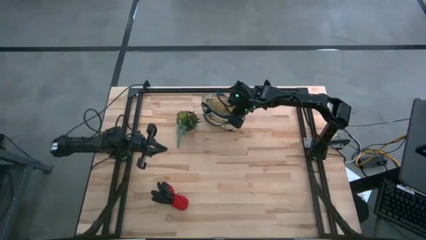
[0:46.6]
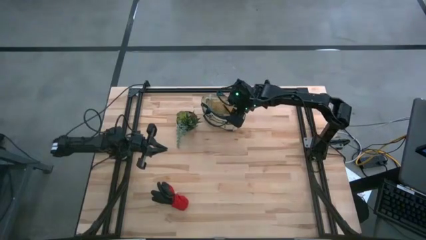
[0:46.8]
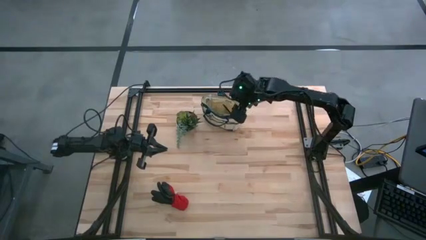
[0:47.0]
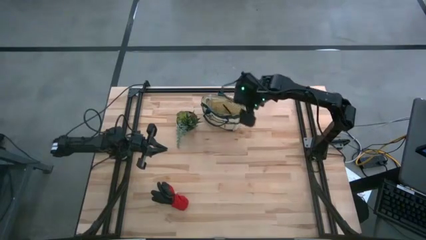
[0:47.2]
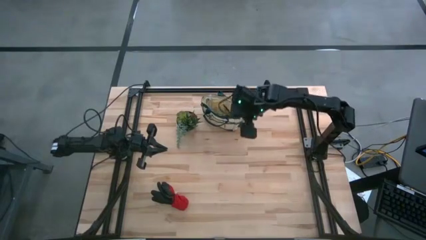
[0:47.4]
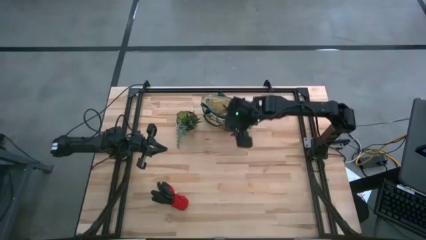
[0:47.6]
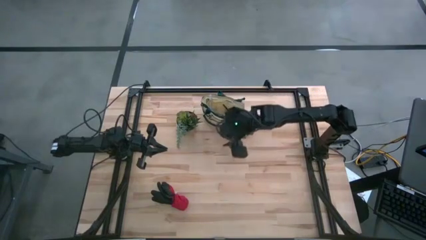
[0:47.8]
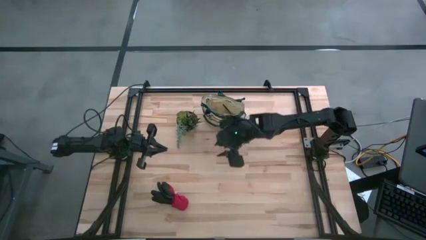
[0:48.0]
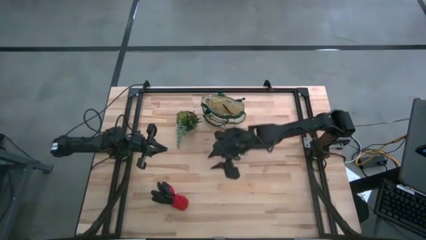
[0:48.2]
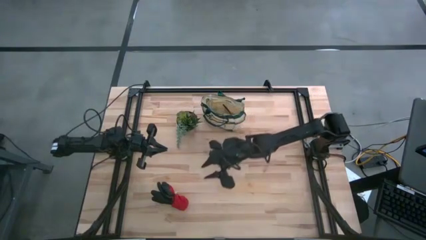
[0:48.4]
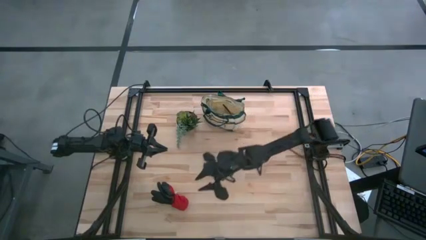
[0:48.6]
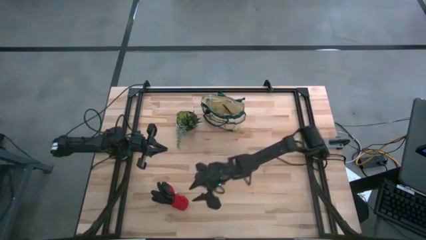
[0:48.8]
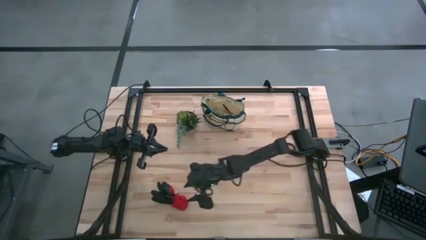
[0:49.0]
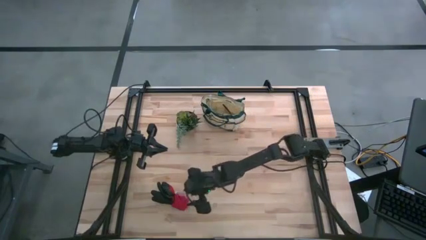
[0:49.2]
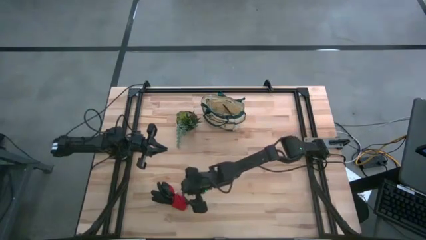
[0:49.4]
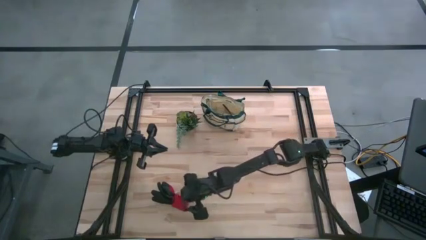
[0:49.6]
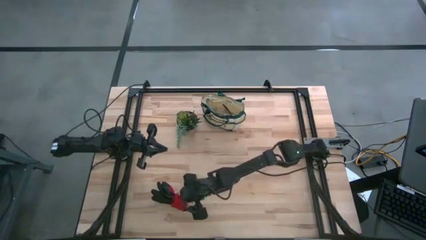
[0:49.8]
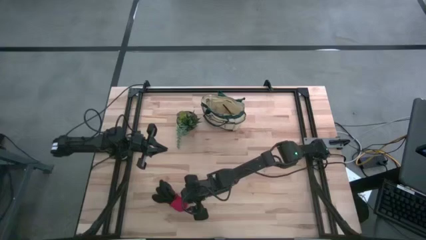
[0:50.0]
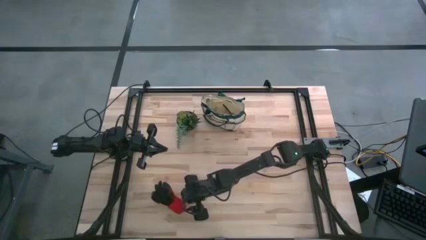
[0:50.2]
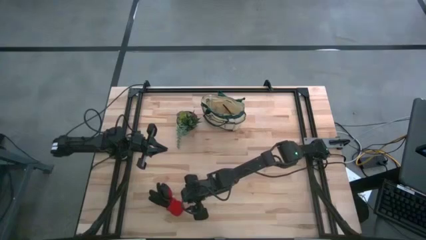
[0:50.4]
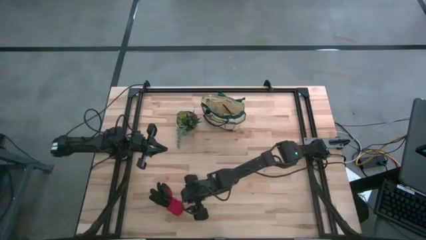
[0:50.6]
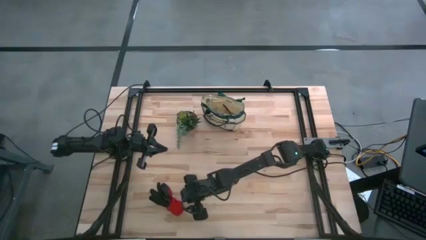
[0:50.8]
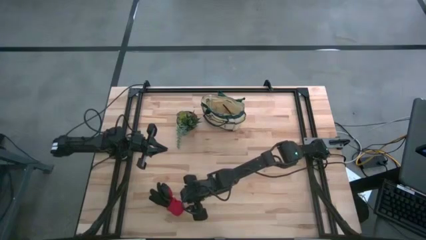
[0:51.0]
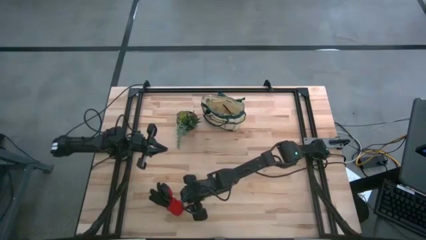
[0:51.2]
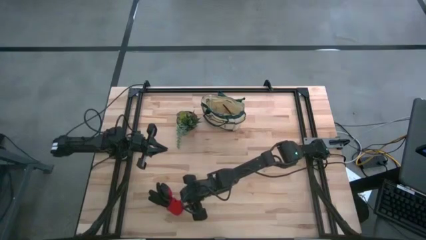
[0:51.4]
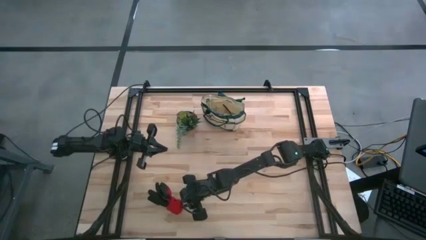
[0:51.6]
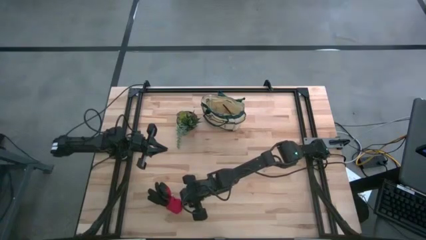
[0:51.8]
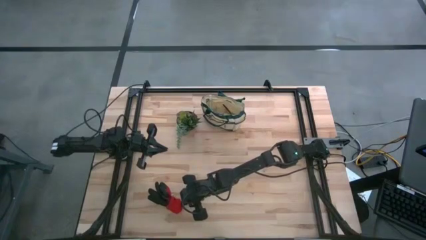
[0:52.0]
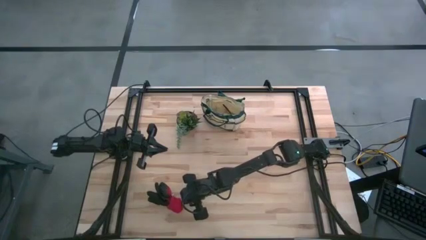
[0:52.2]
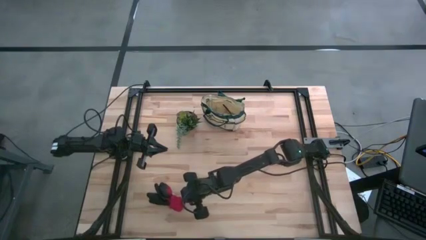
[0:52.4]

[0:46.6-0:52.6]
Task: Pick & Place Garden tools in Gardening bag
Put the red gloves into the gardening bag

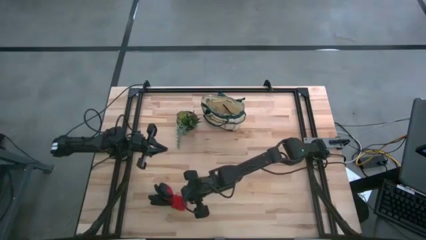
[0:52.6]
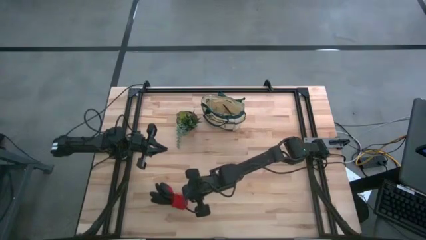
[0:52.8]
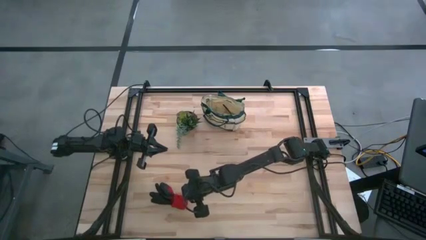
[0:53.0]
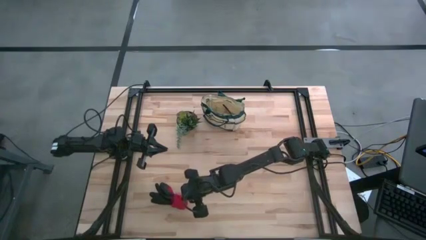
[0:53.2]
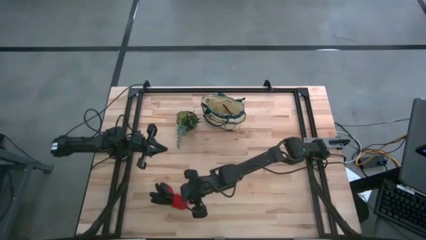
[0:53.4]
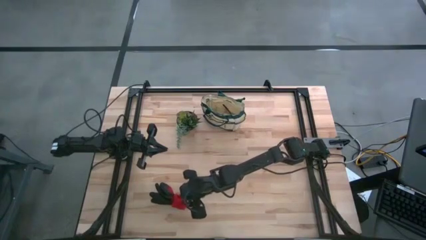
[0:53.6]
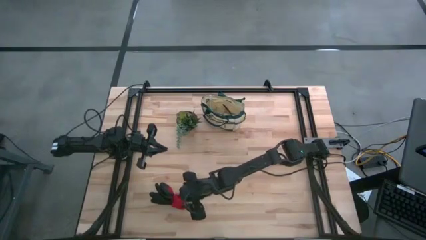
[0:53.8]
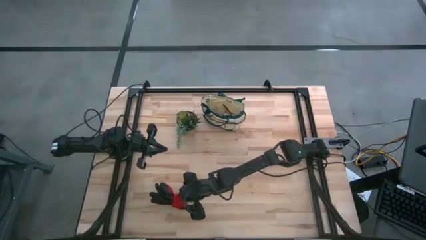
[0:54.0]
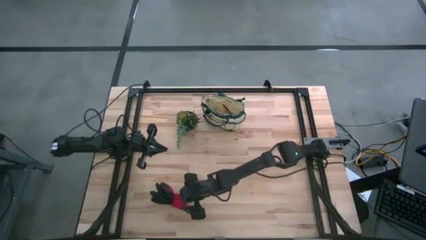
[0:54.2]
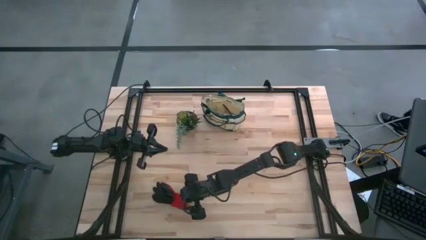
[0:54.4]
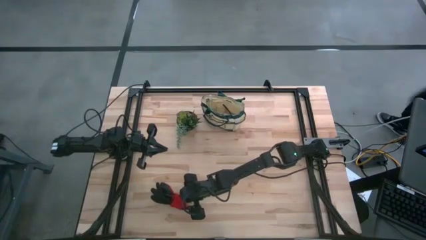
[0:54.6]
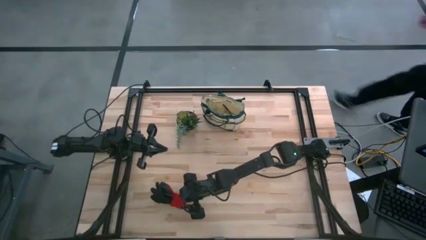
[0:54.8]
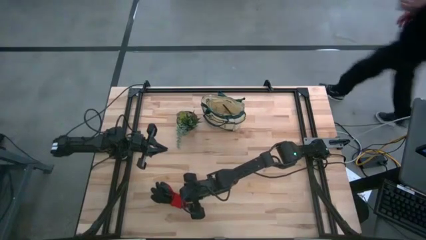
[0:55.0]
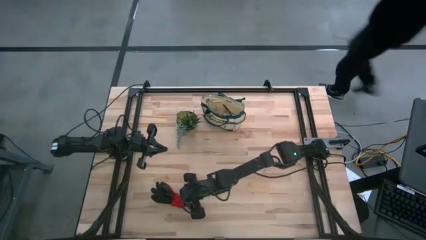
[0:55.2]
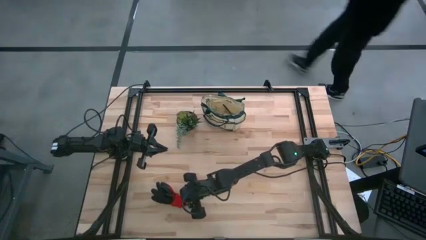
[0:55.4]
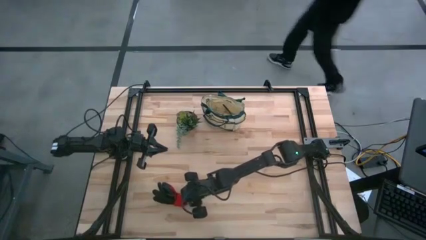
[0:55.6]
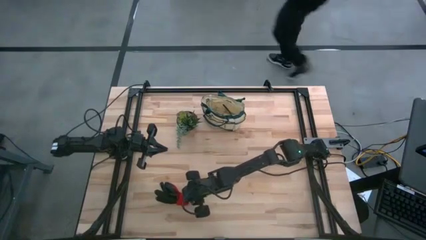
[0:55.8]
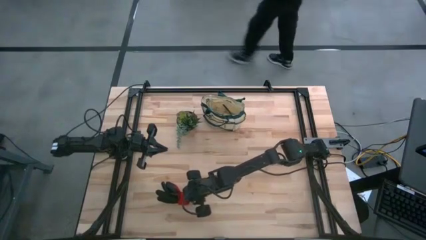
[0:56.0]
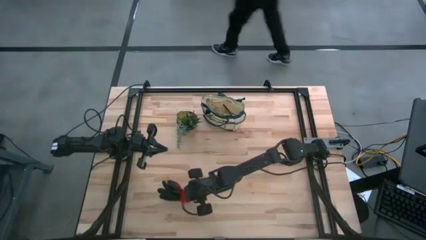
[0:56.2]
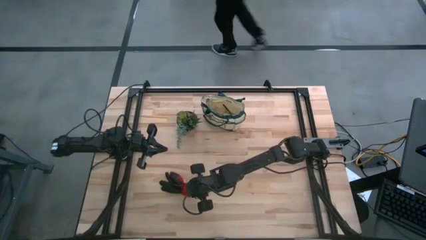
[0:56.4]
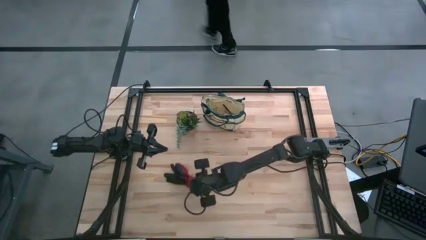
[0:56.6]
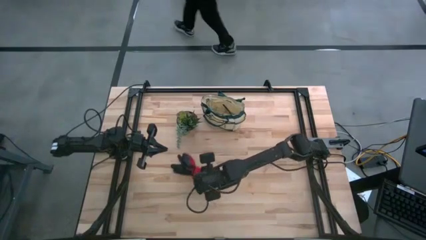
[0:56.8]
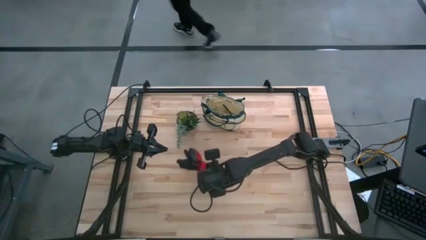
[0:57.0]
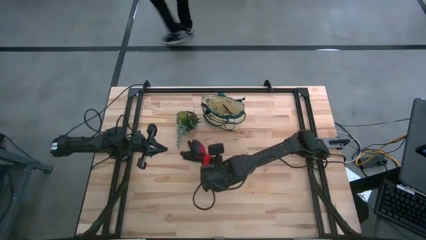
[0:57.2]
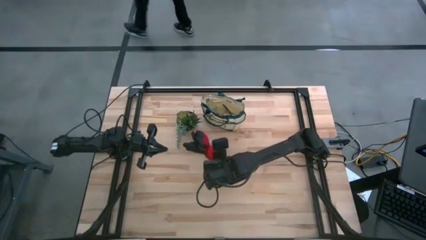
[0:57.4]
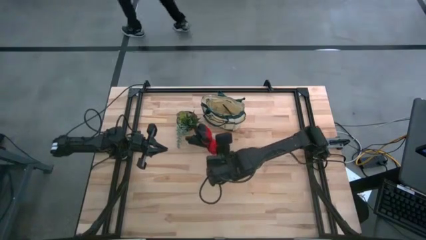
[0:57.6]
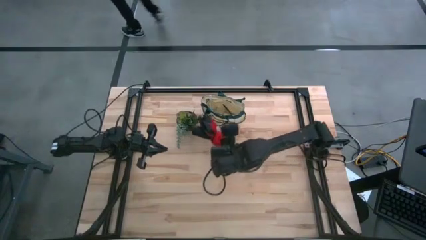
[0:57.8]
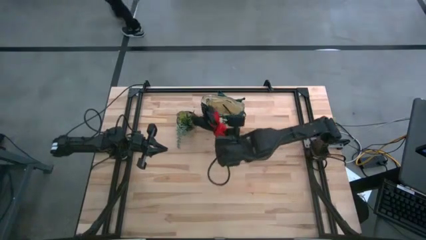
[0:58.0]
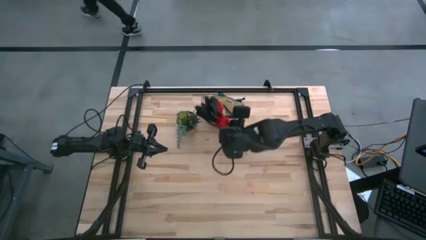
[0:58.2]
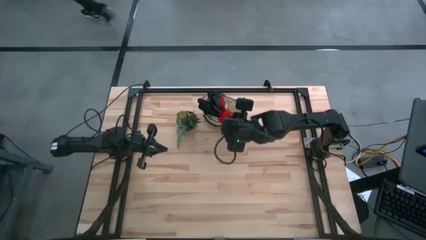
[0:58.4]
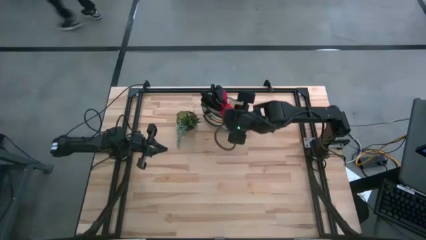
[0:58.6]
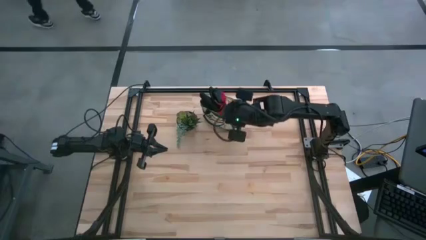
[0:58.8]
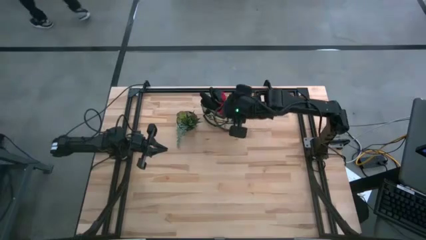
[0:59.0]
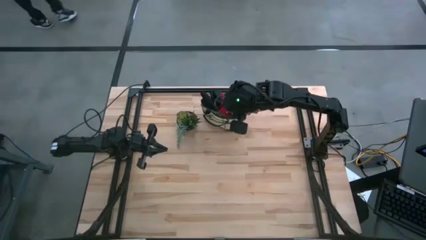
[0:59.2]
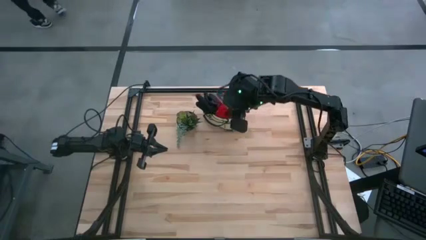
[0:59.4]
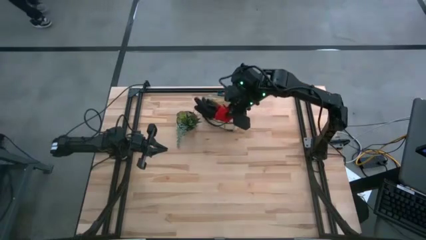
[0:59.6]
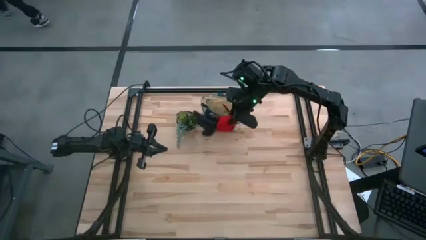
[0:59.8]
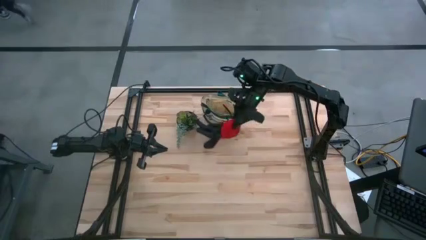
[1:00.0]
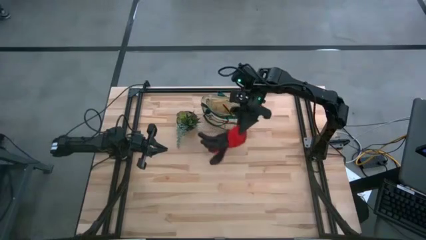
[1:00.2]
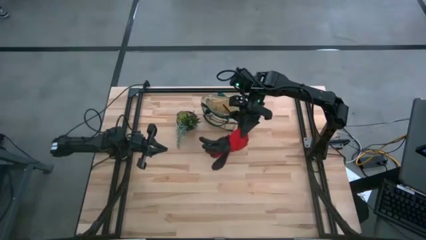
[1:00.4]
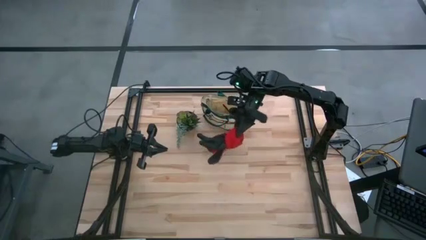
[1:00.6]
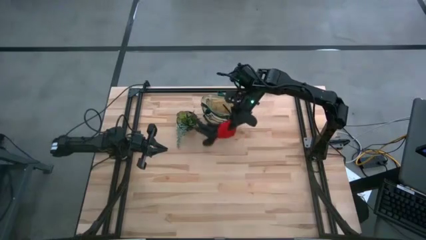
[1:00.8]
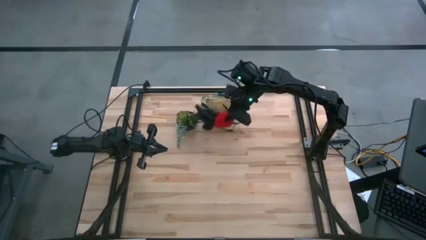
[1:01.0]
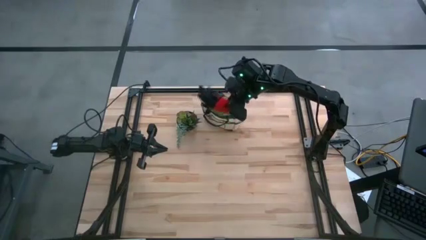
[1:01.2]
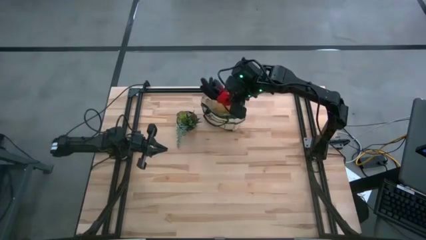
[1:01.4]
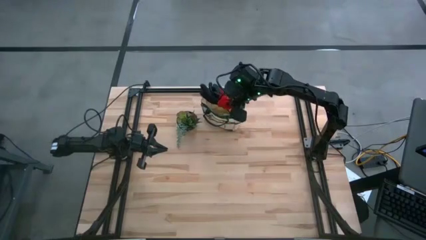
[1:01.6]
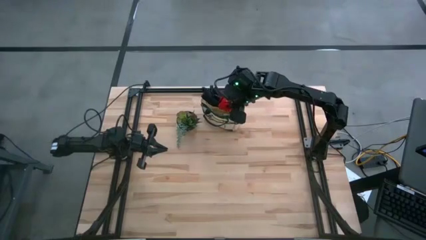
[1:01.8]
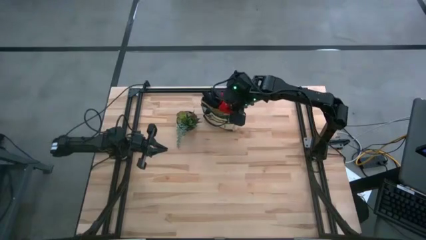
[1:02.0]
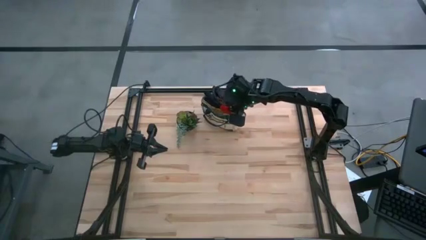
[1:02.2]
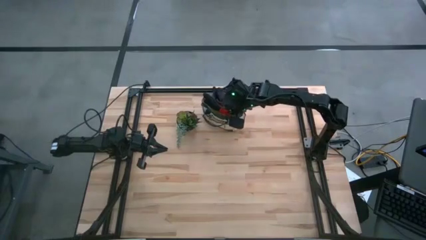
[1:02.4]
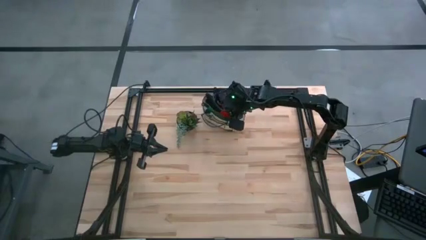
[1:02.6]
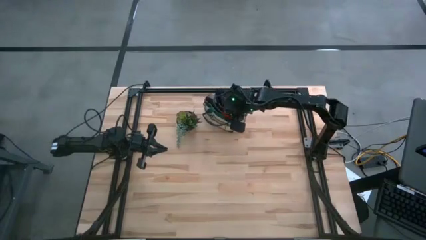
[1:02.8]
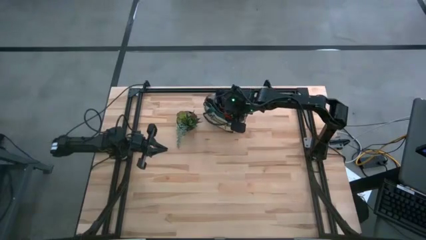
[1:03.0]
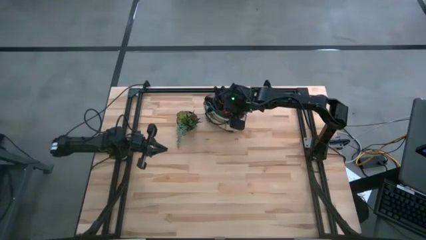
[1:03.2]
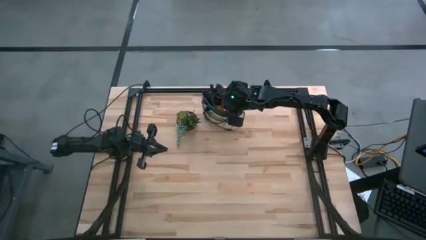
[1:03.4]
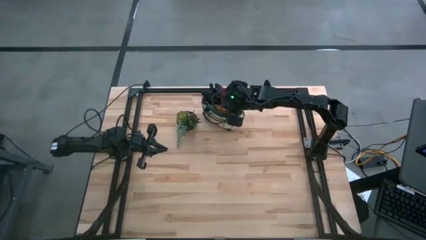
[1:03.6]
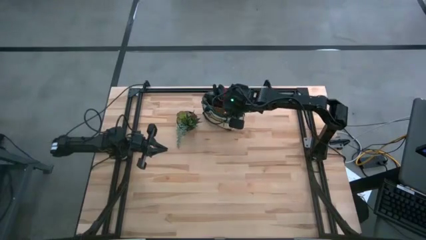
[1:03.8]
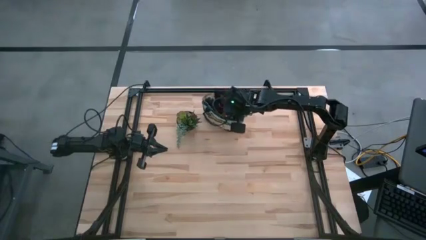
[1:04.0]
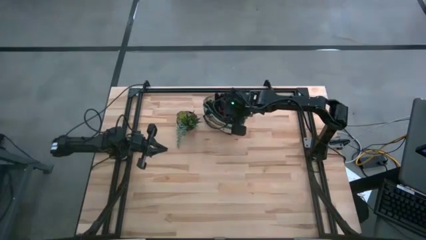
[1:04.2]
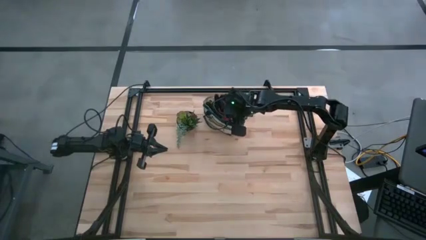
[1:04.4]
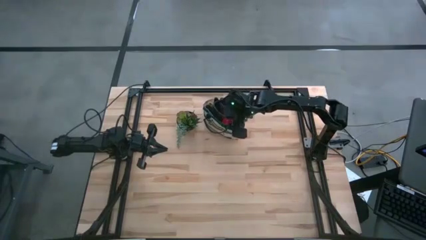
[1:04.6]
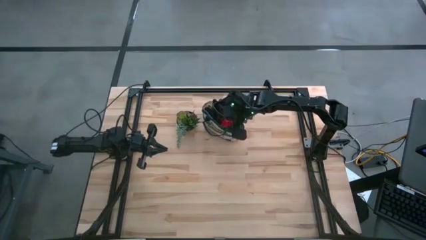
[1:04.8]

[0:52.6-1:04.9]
Put the red gloves into the gardening bag
